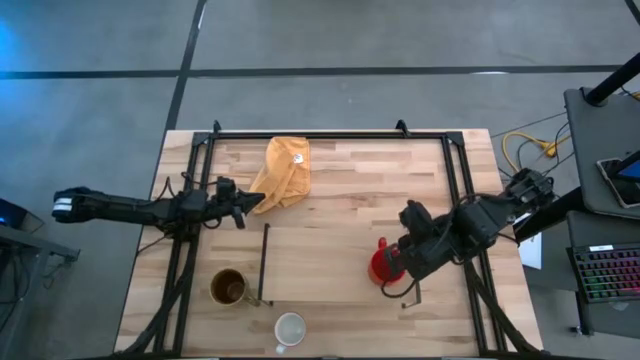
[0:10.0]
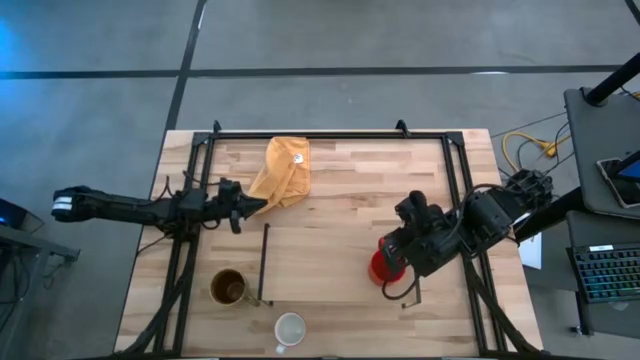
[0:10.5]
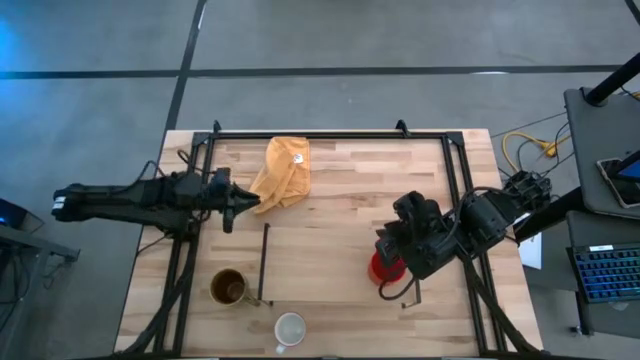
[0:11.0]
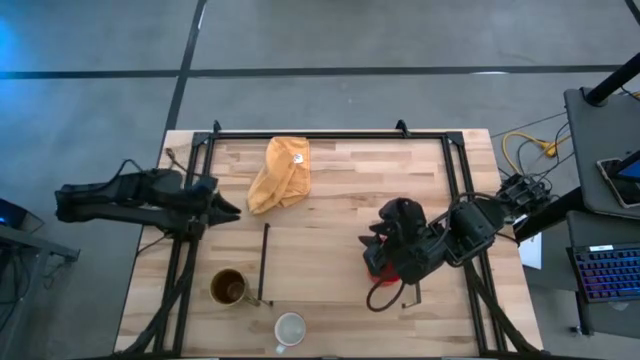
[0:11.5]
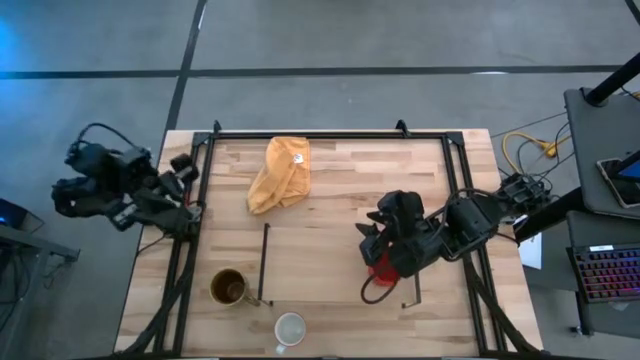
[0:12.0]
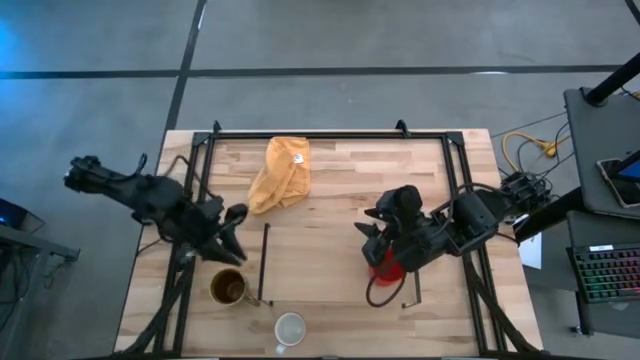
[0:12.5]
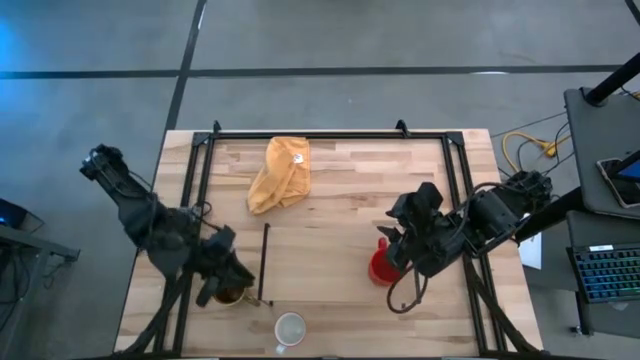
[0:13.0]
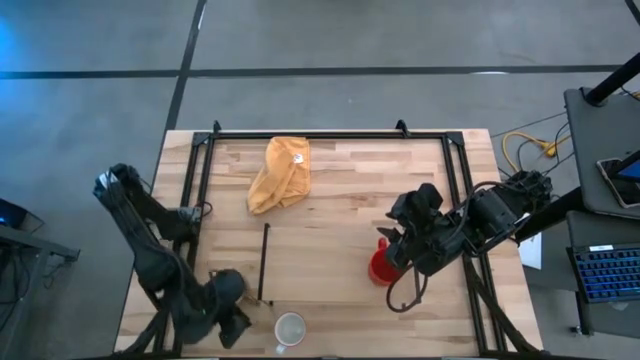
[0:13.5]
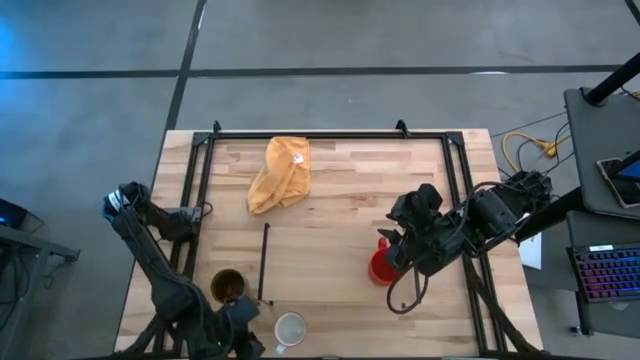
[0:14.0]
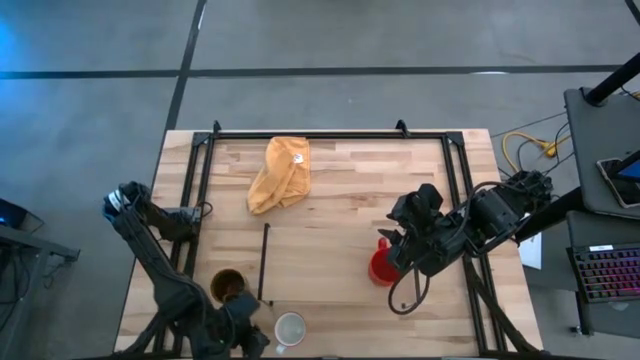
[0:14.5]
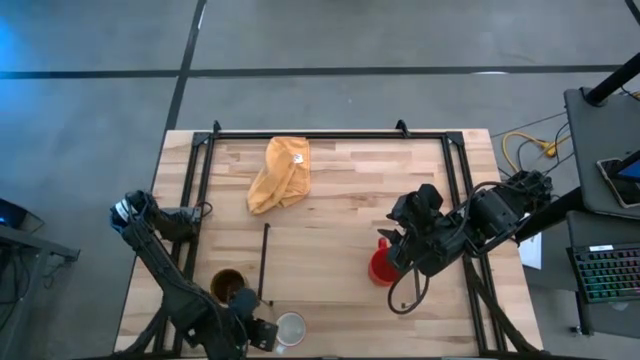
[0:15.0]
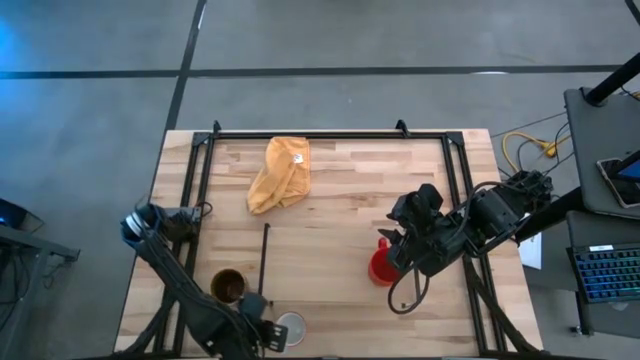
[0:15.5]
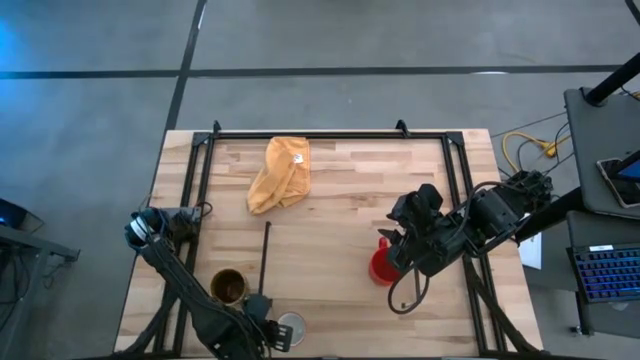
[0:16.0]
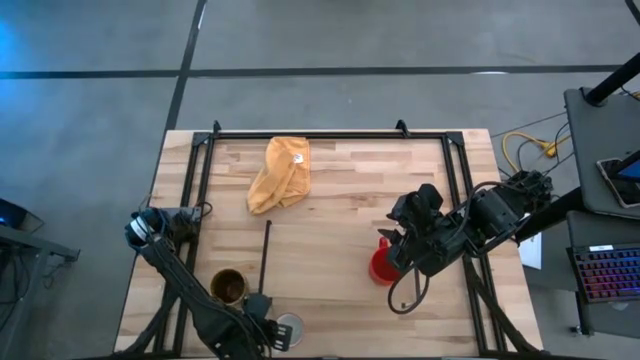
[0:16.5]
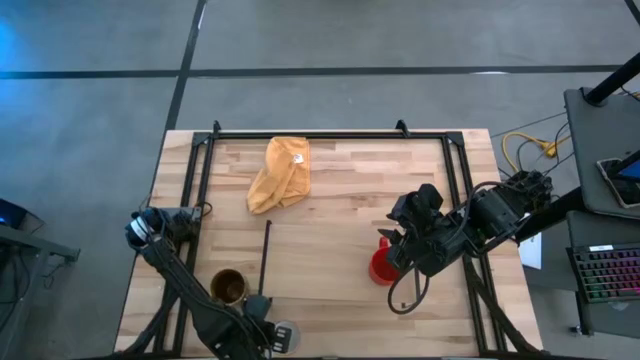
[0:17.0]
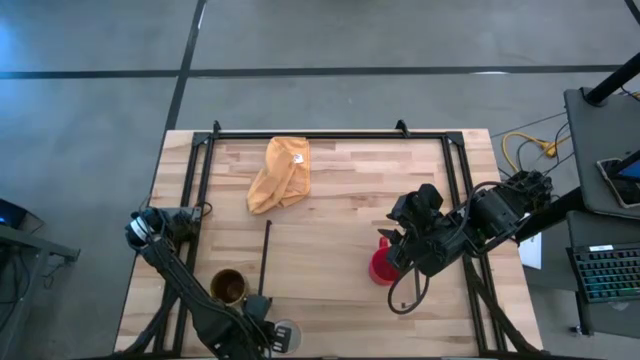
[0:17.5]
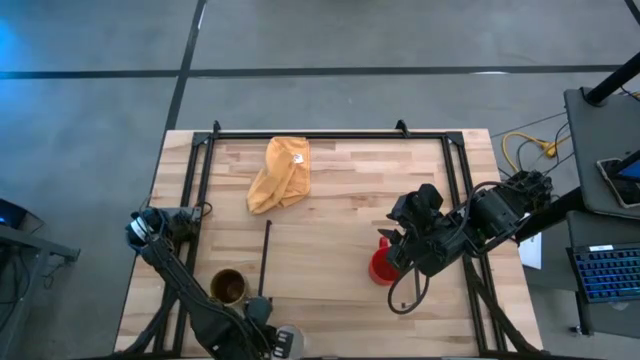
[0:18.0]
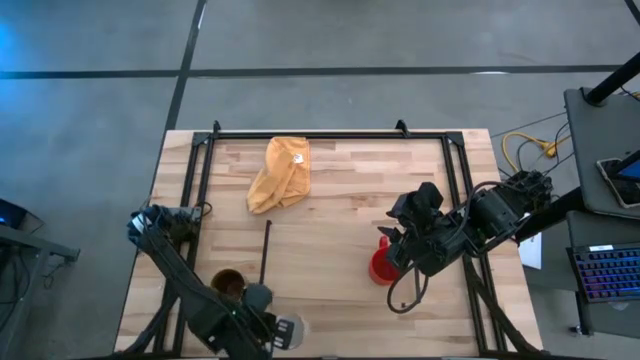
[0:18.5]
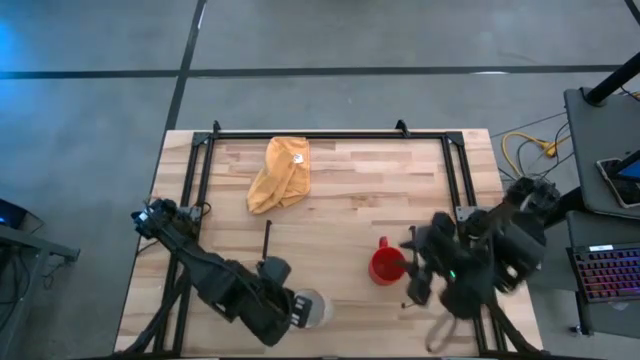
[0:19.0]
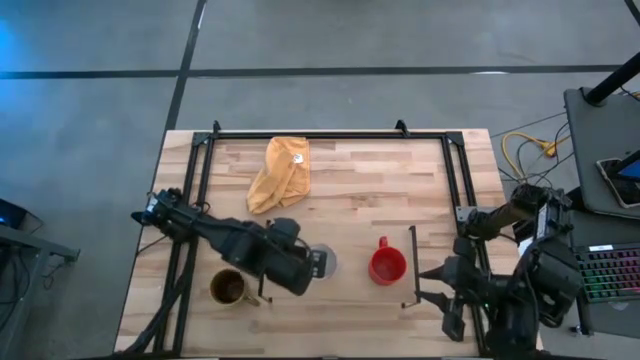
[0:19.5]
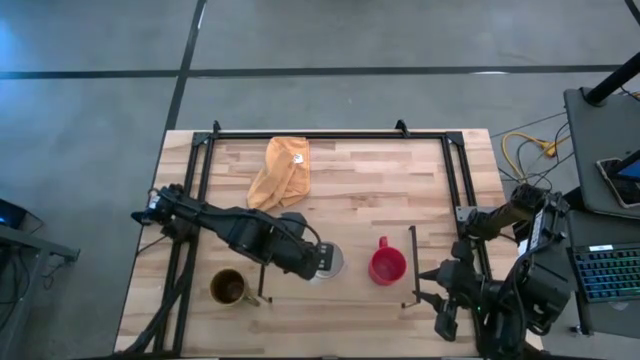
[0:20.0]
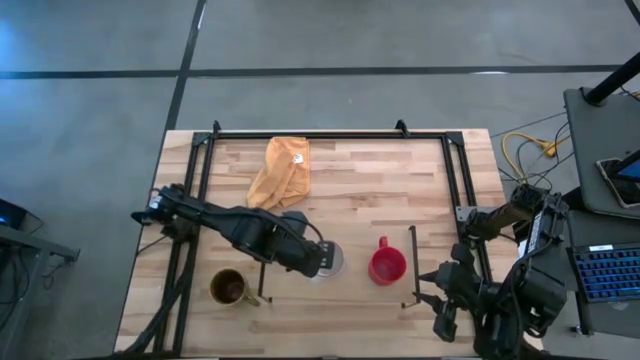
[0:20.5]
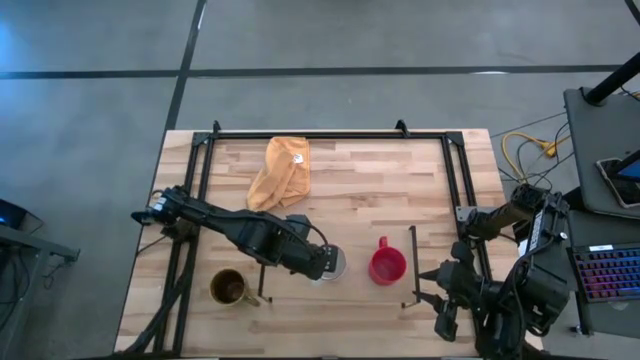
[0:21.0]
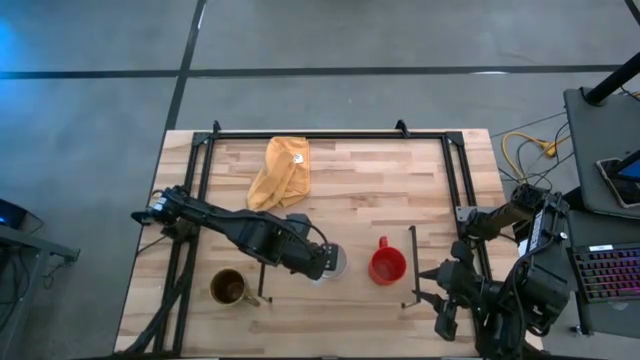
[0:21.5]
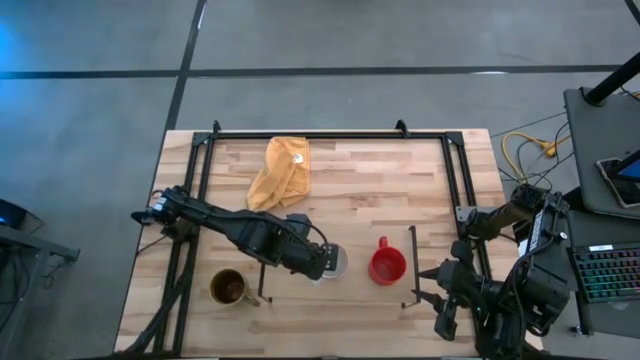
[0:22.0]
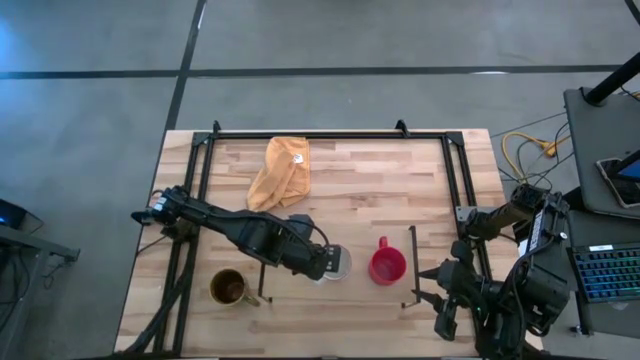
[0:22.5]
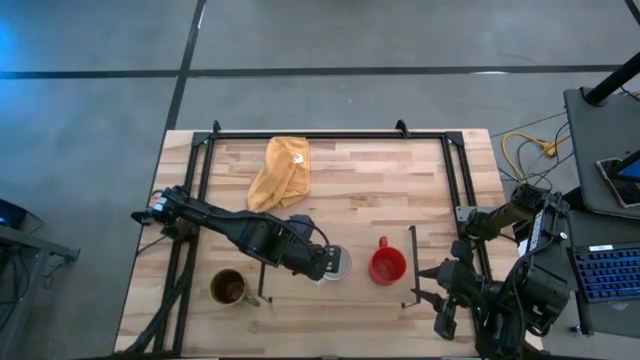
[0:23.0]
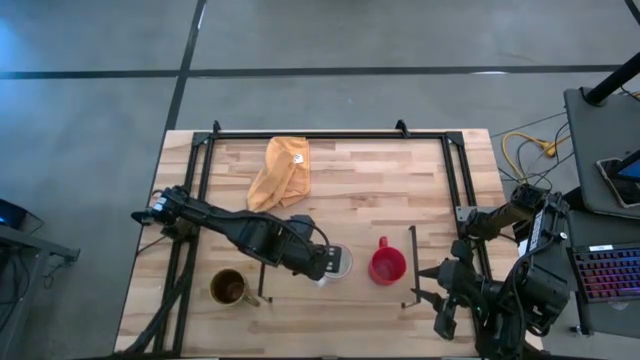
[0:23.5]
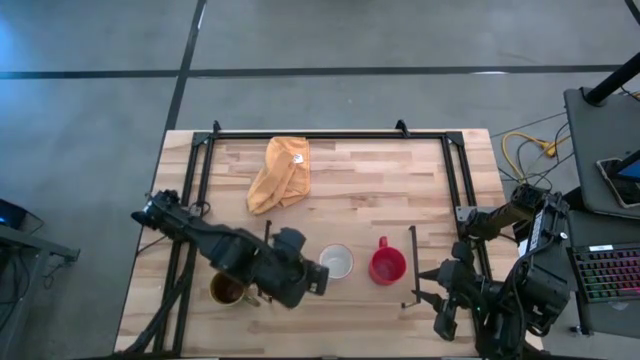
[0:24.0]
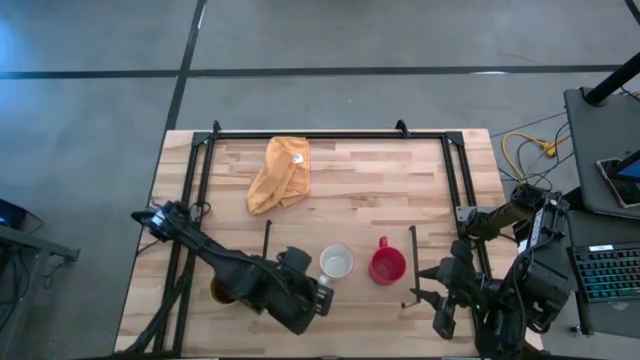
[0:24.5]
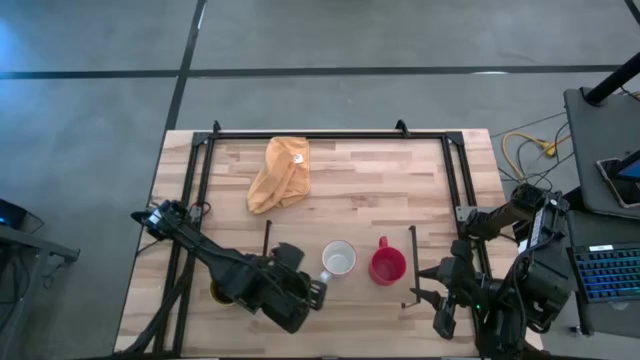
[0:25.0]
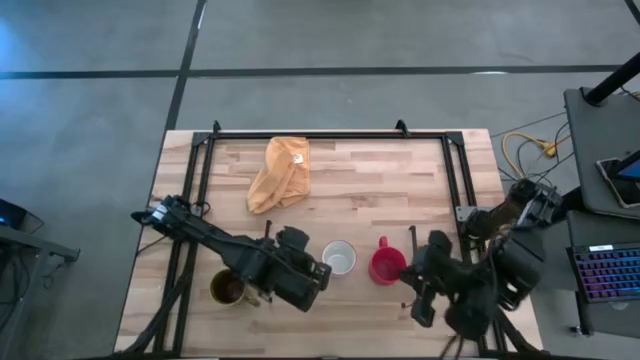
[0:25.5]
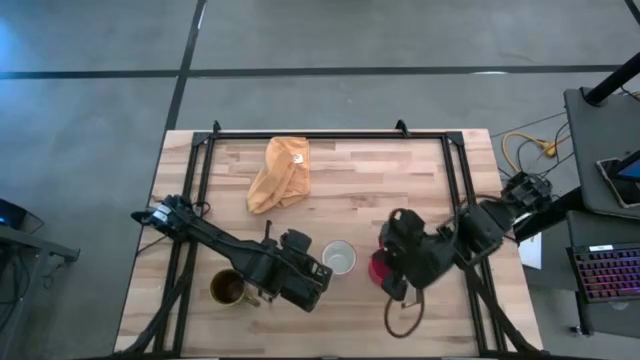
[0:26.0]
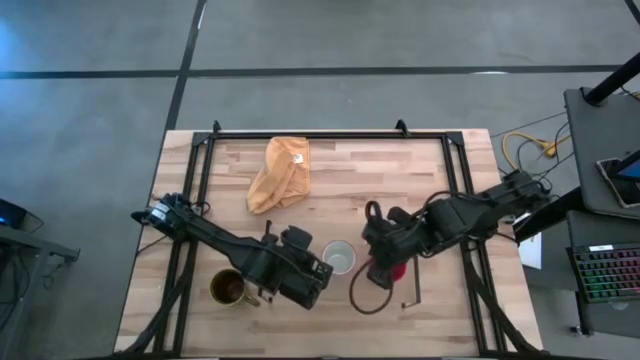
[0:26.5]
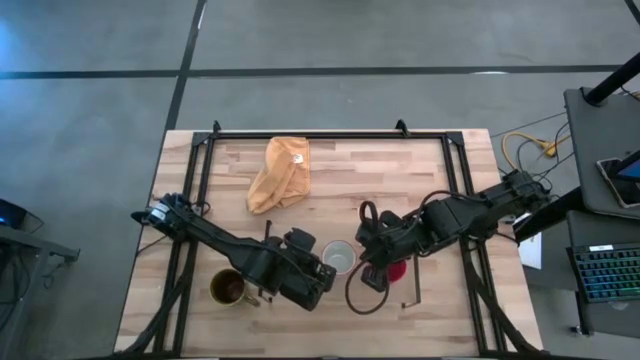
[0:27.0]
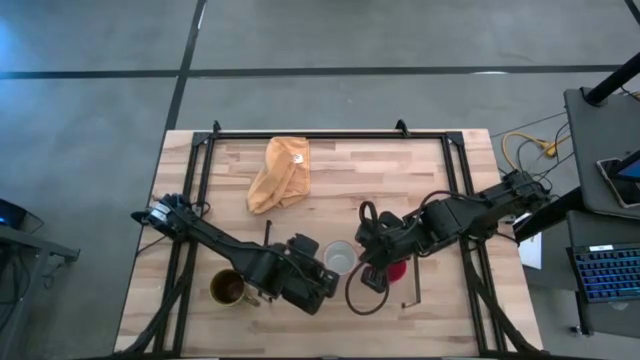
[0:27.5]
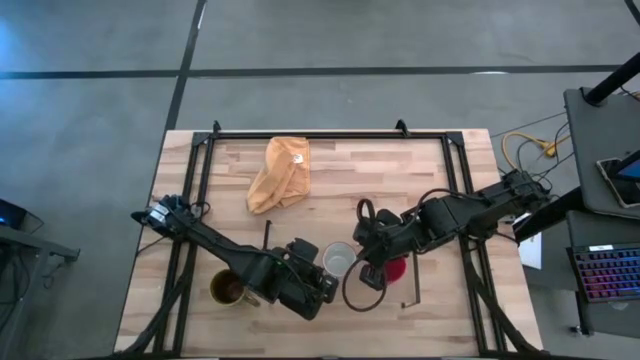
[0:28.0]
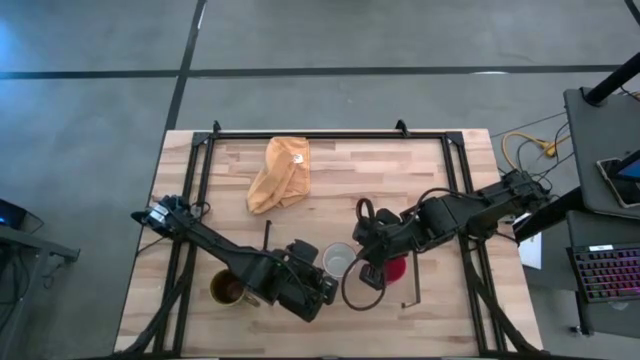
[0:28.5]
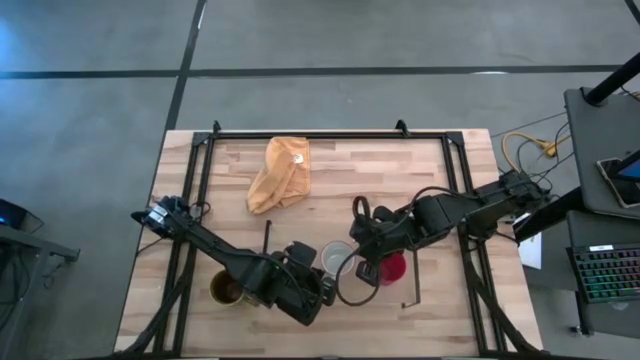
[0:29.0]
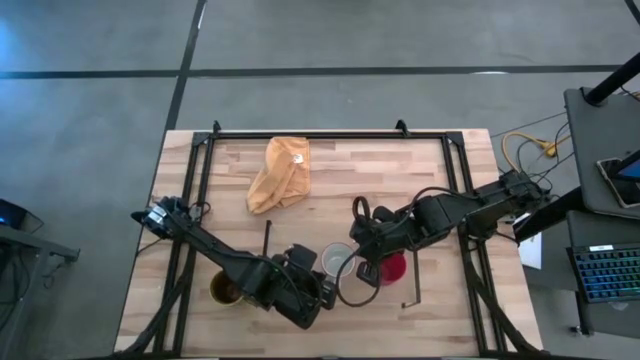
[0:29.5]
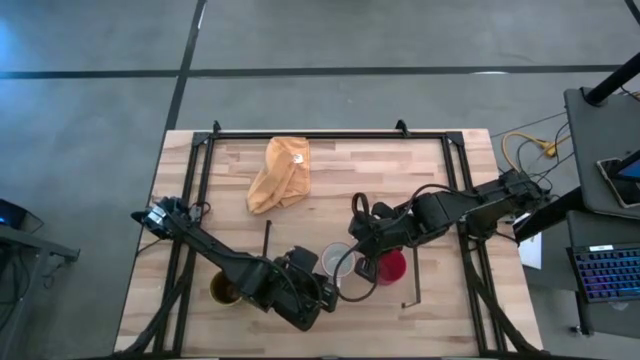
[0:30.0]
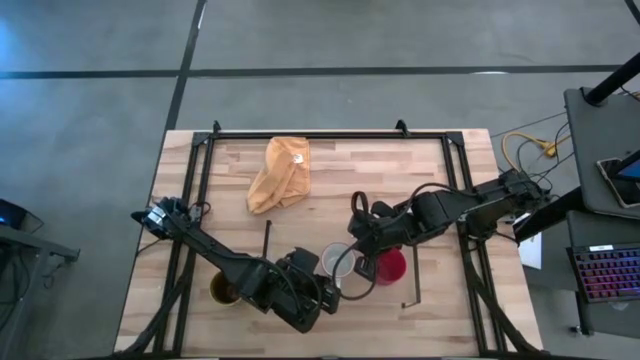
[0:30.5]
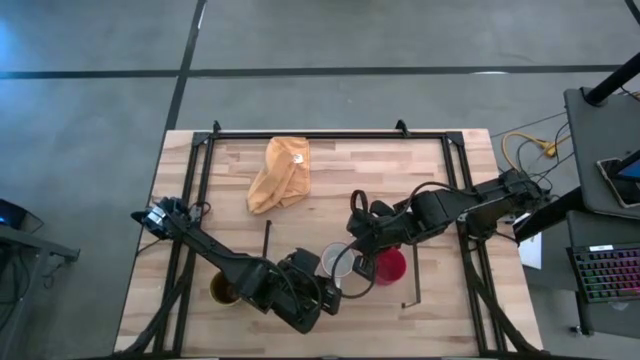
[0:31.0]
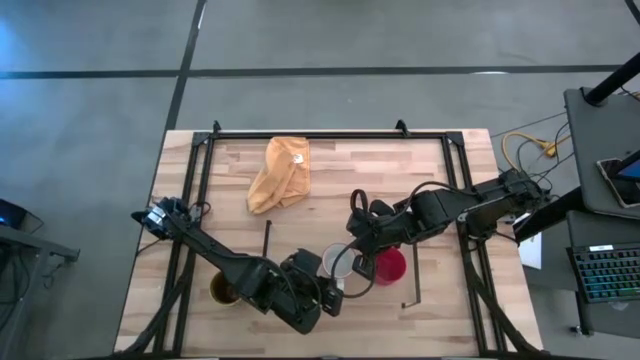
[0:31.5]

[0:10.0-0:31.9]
Task: Stack small to large cups/mugs on shelf
Put the white mug on the shelf
